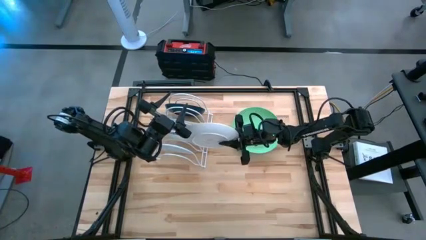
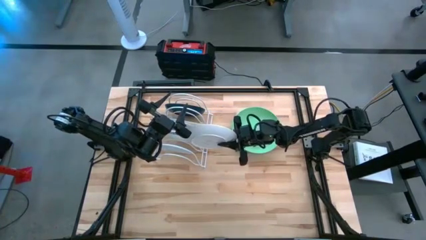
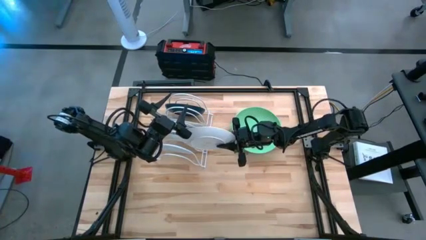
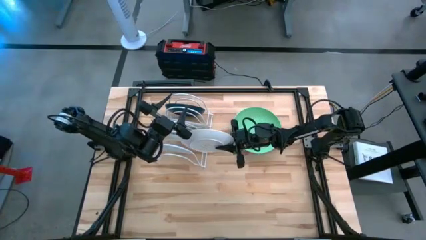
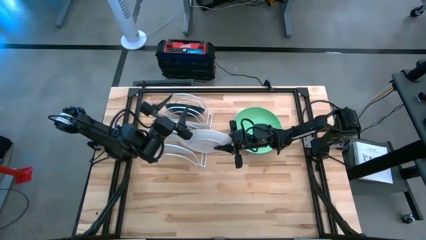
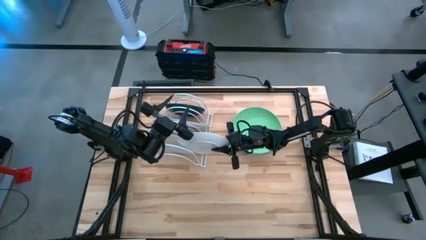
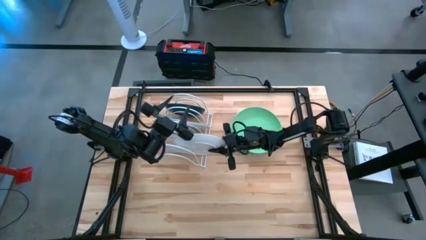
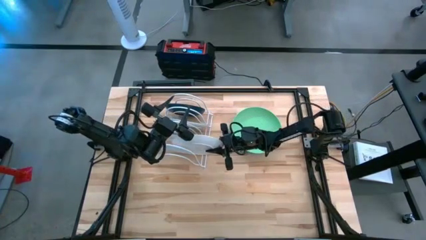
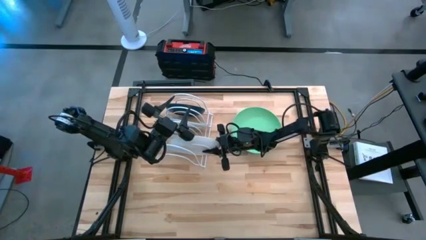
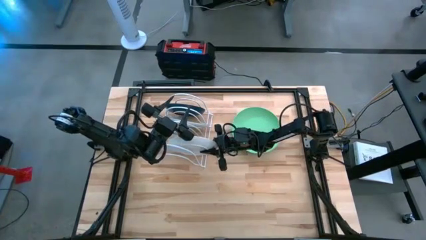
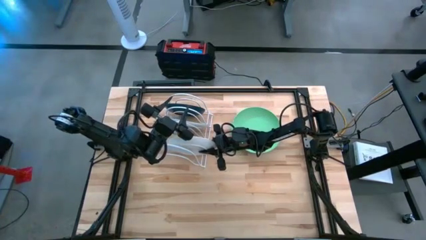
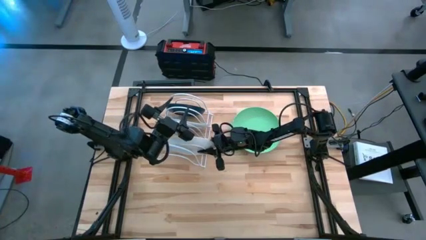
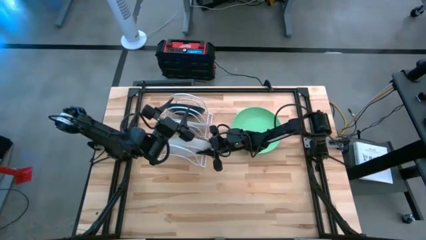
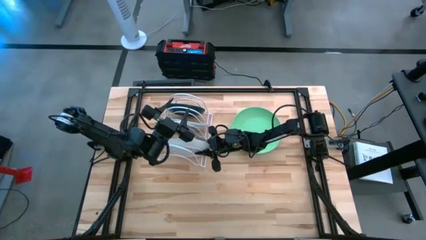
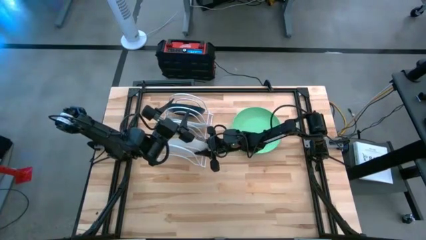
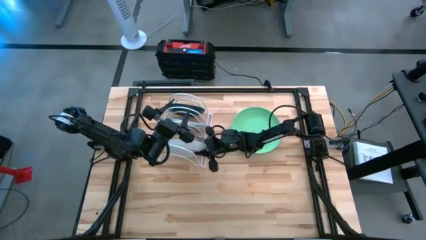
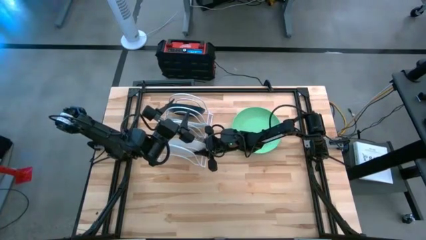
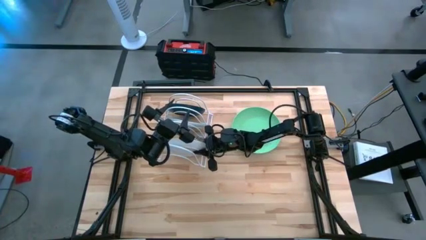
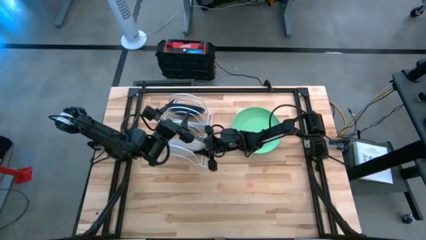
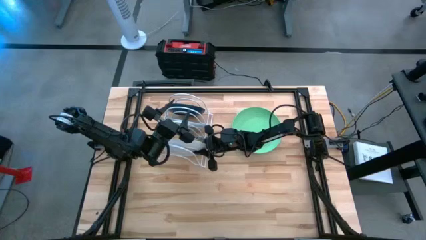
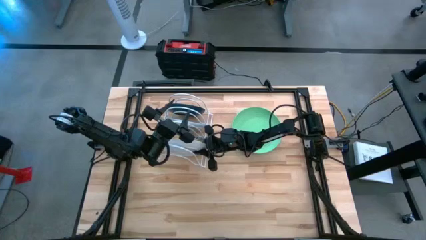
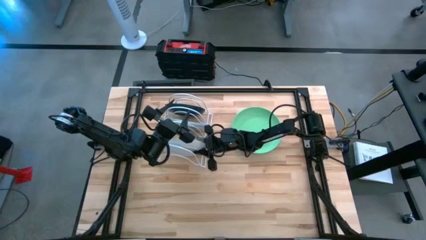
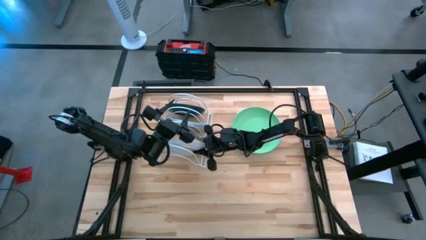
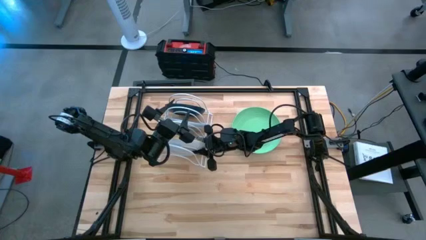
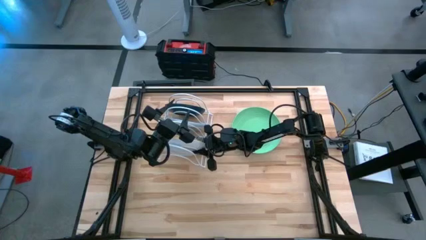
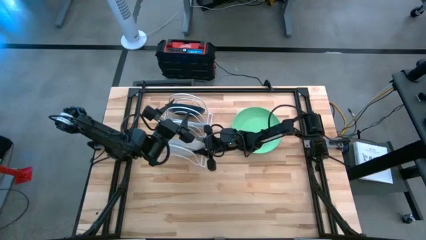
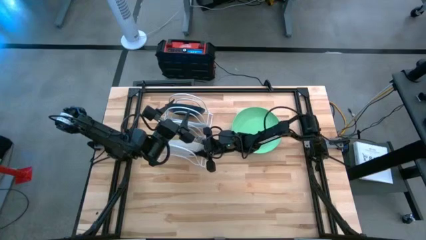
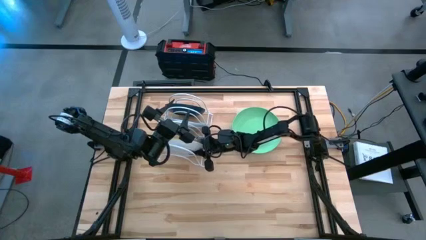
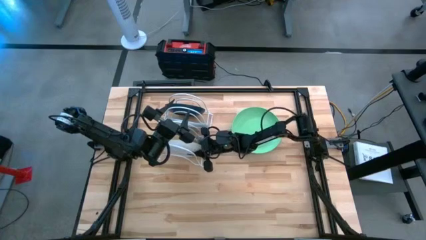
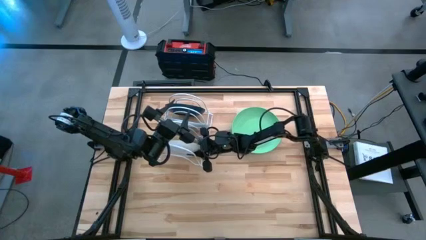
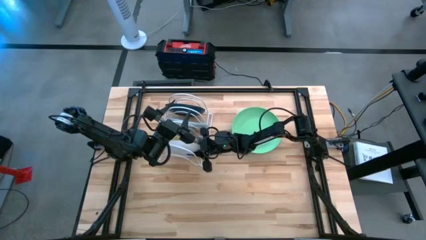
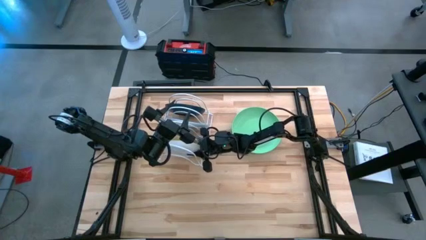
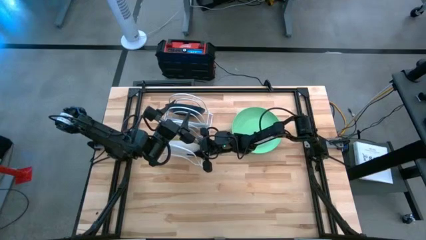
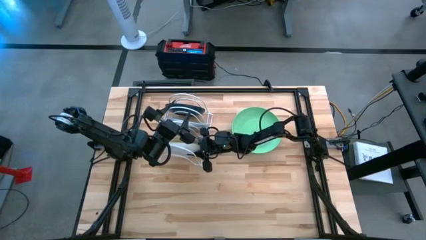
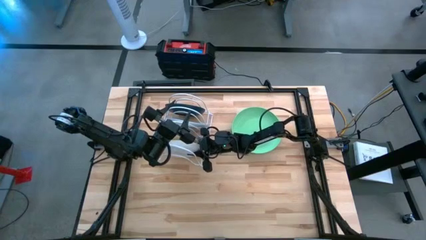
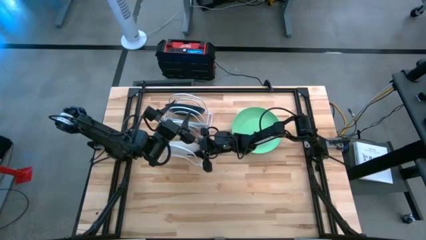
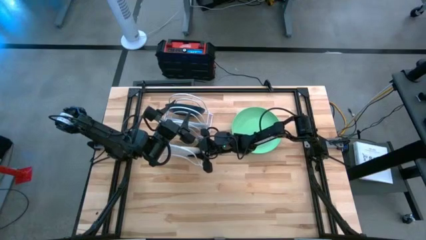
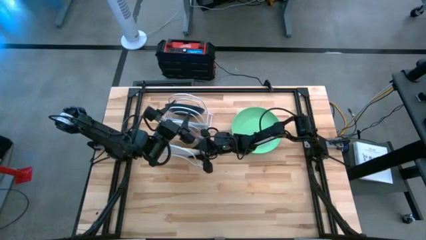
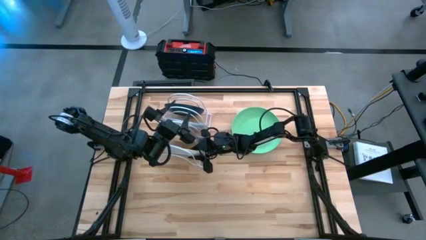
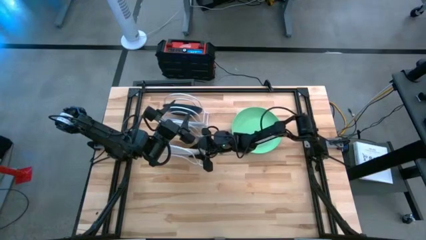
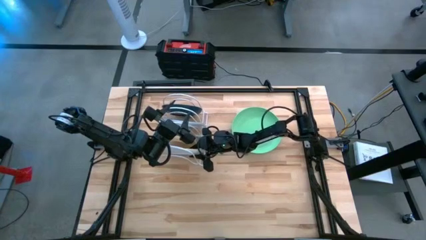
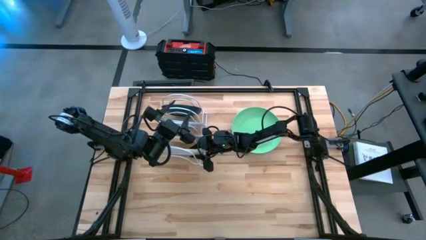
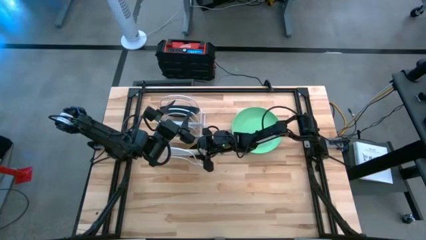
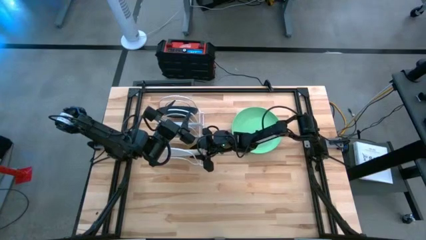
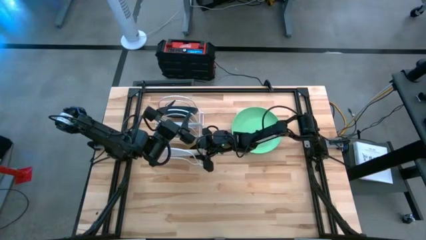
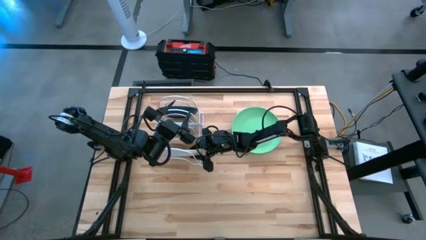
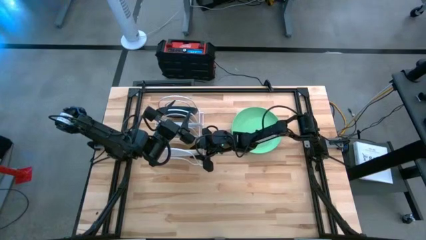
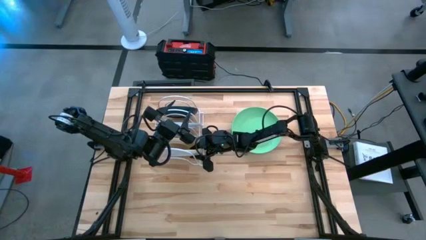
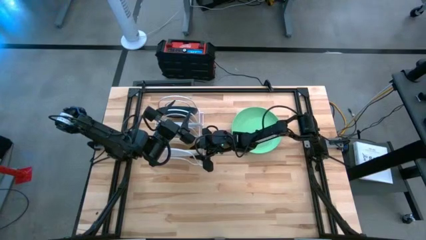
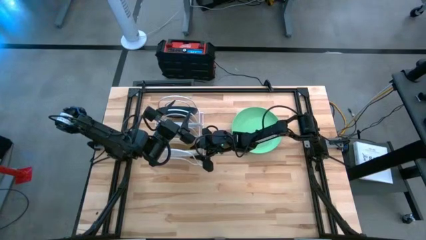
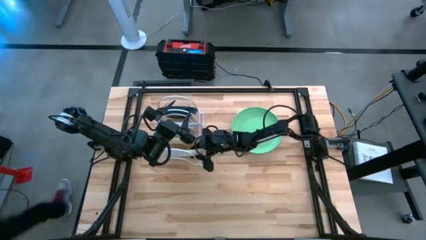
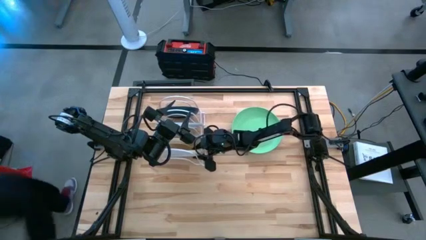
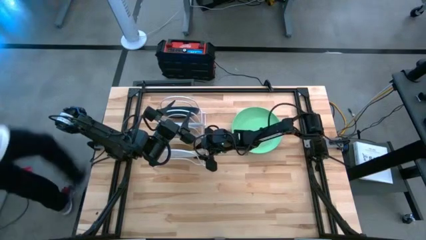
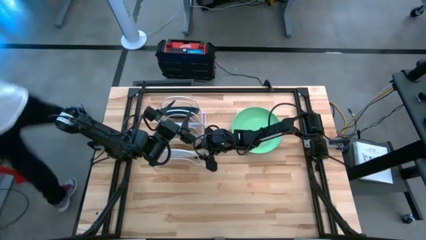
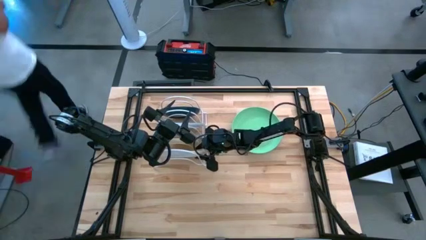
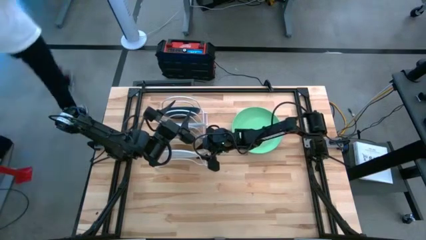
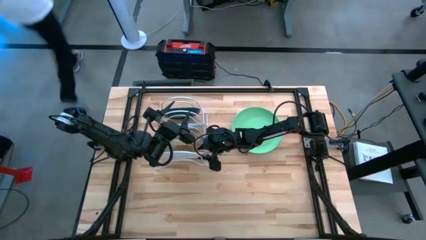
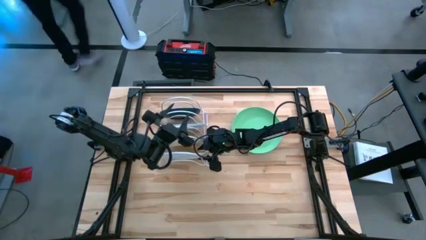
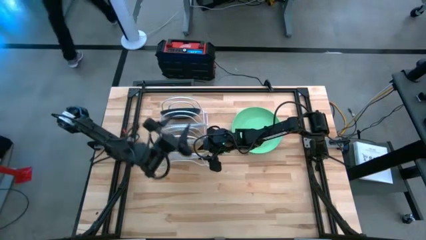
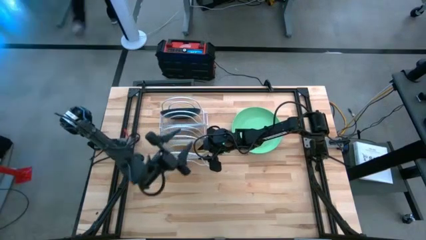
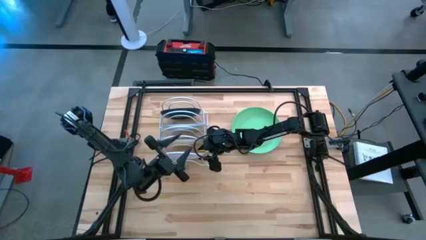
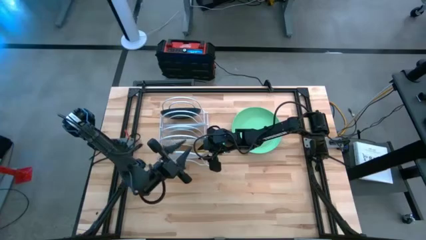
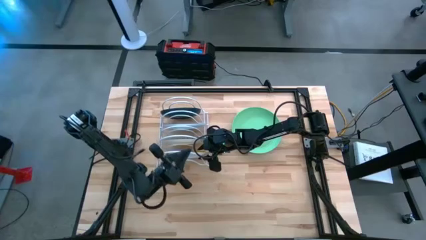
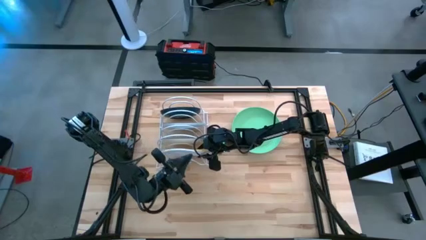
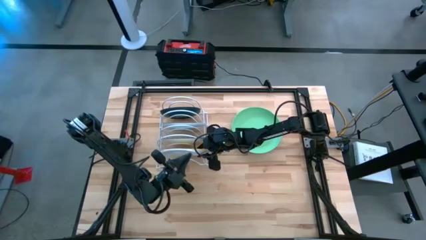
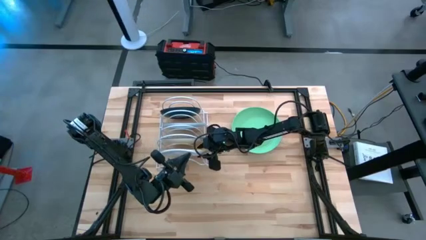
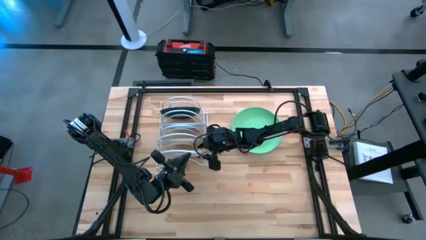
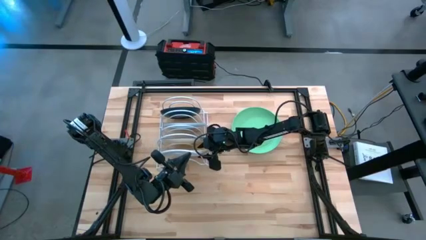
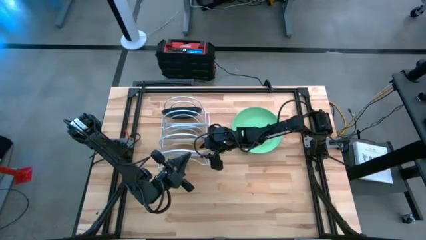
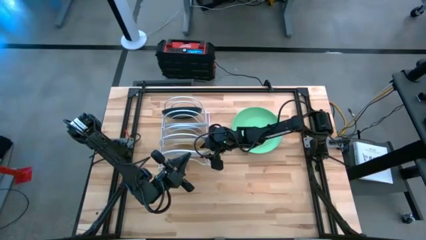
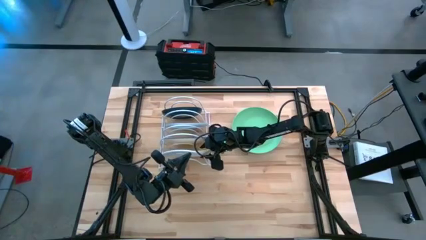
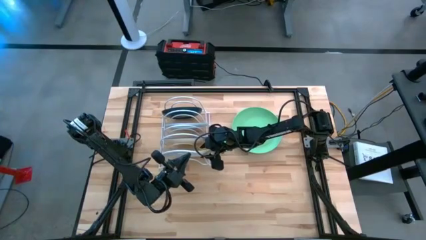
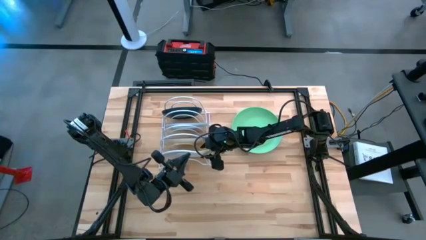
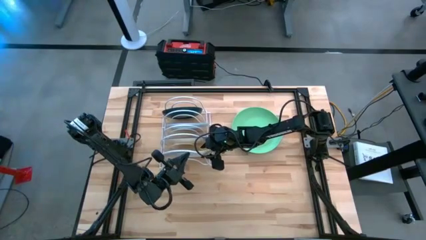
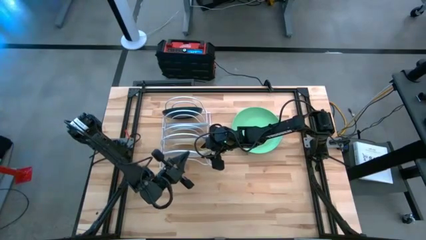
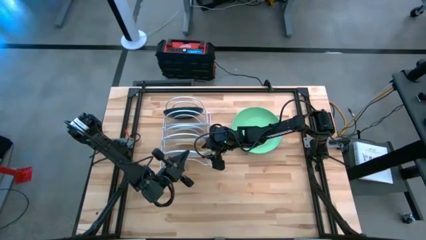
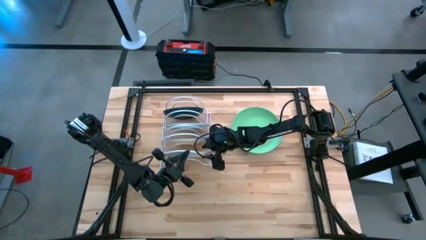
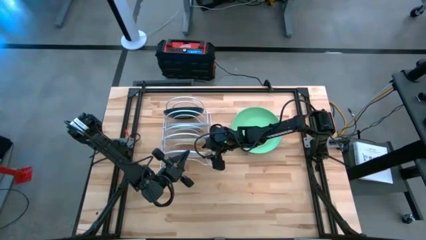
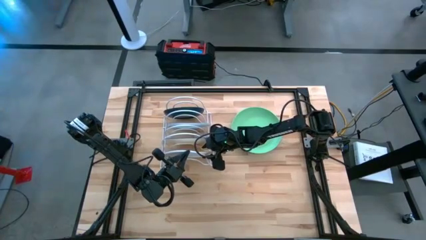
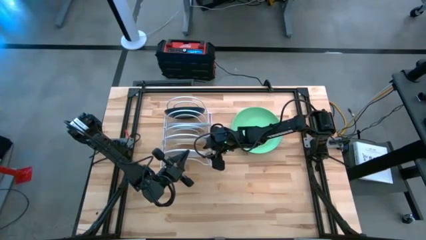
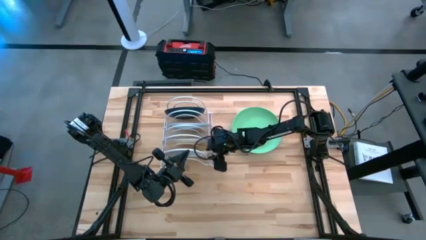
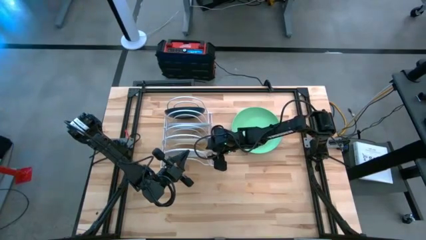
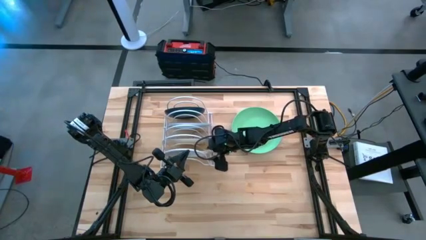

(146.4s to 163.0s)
Task: Sort dishes
Put the yellow pattern plate in the dish rack
